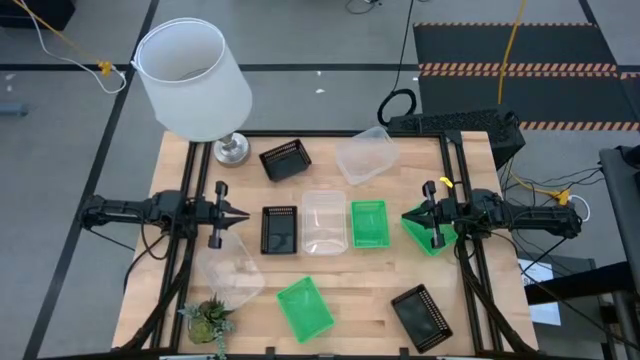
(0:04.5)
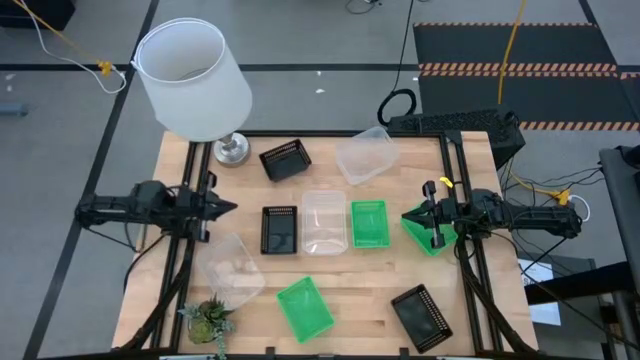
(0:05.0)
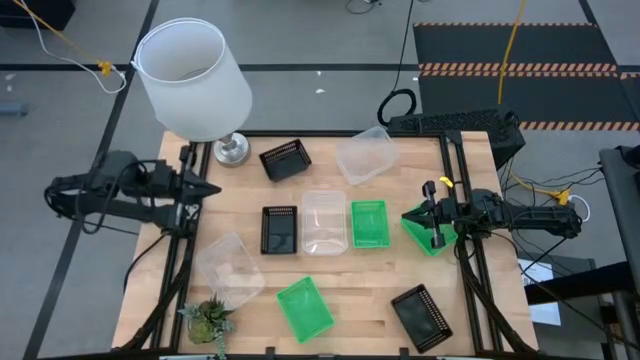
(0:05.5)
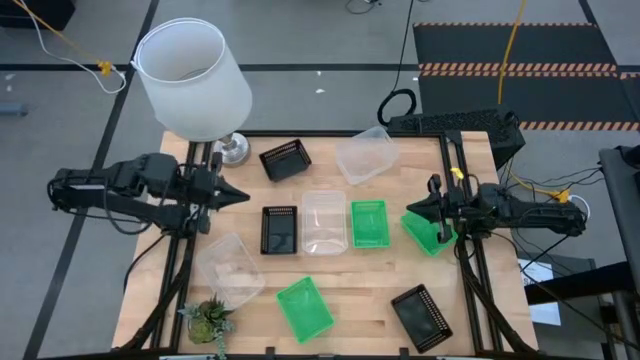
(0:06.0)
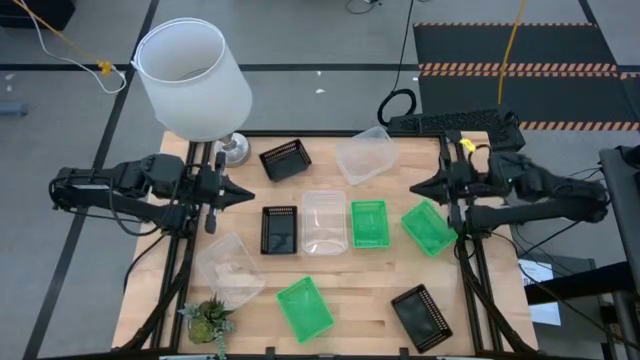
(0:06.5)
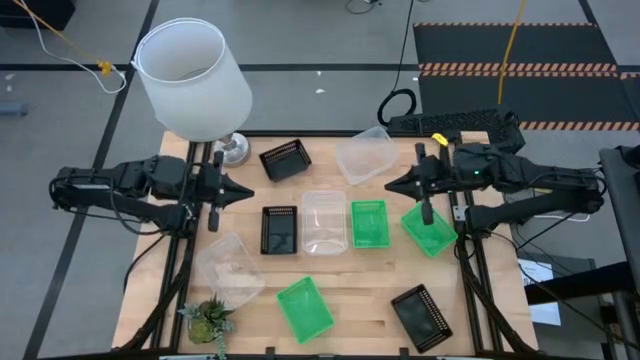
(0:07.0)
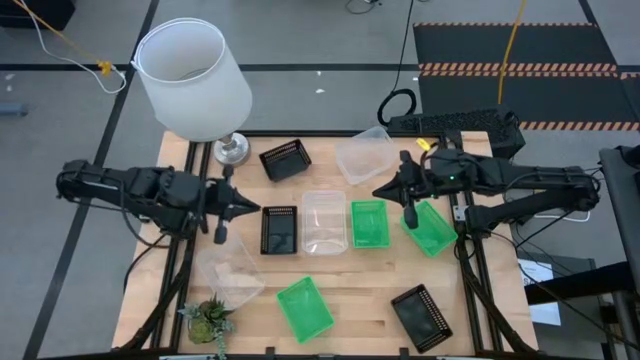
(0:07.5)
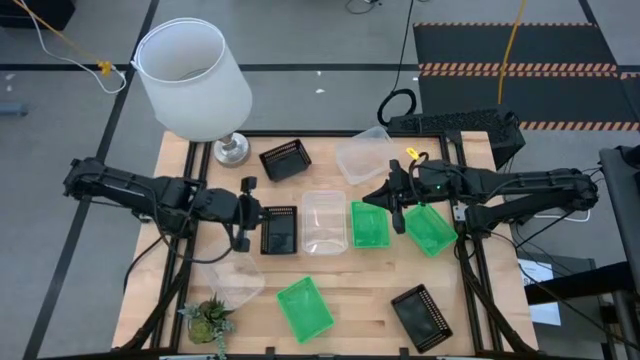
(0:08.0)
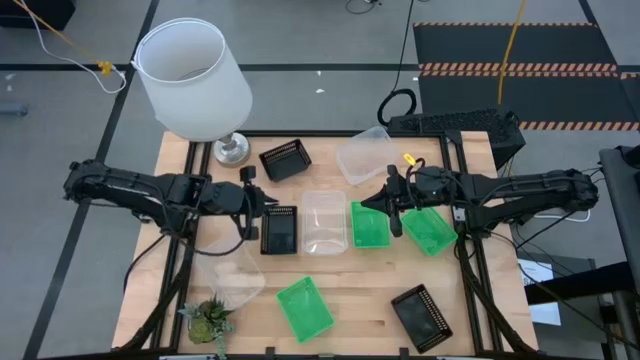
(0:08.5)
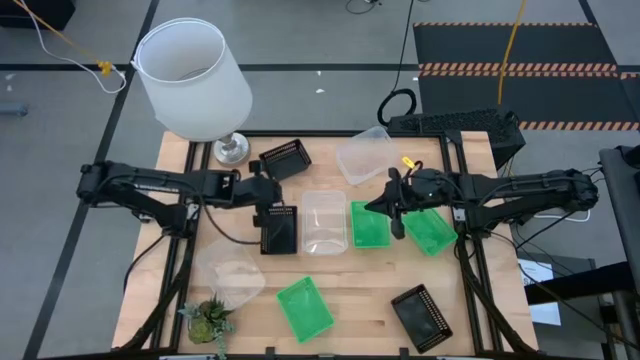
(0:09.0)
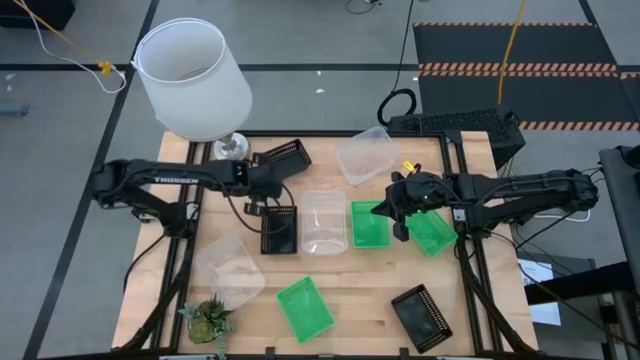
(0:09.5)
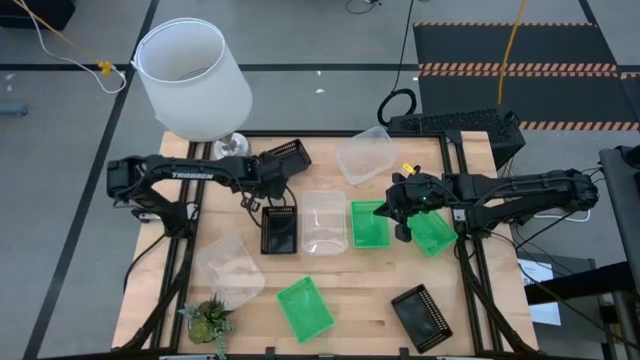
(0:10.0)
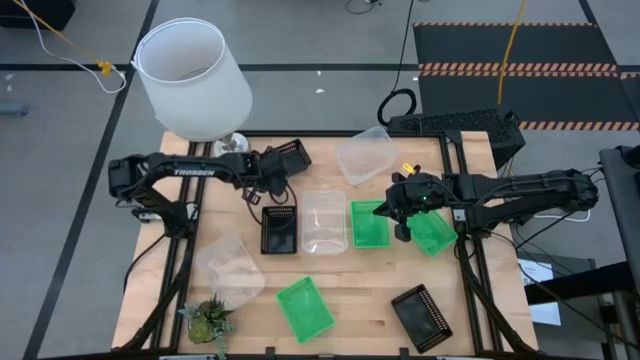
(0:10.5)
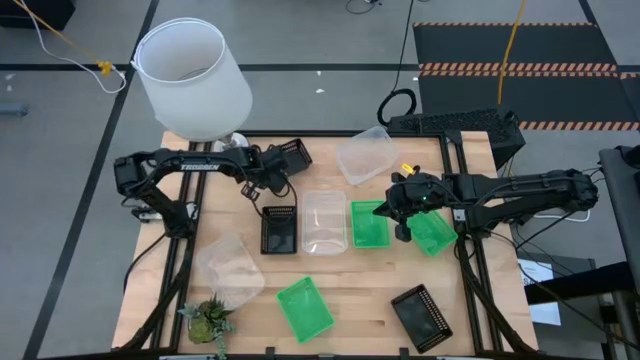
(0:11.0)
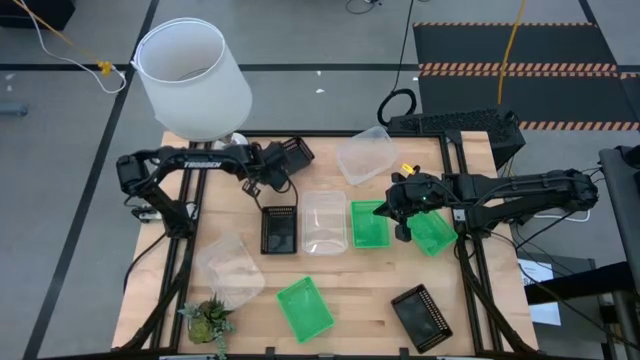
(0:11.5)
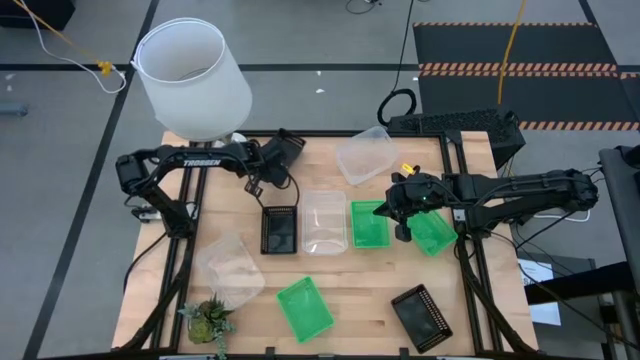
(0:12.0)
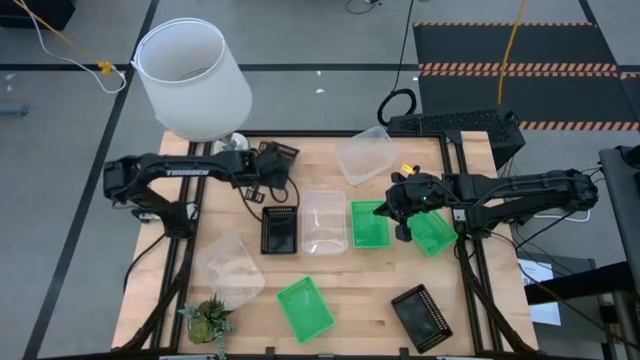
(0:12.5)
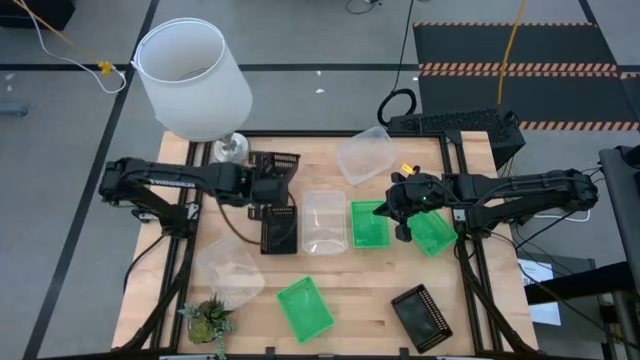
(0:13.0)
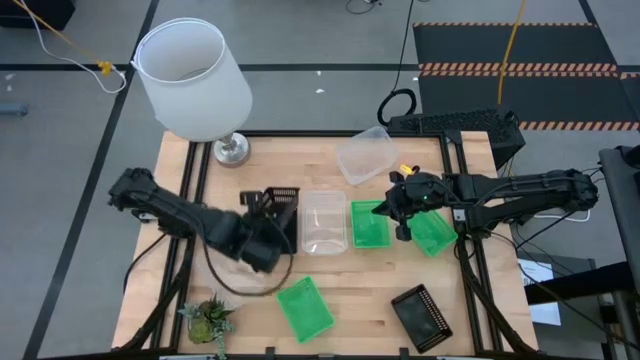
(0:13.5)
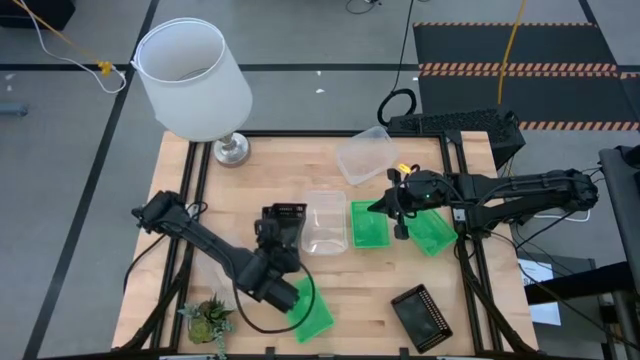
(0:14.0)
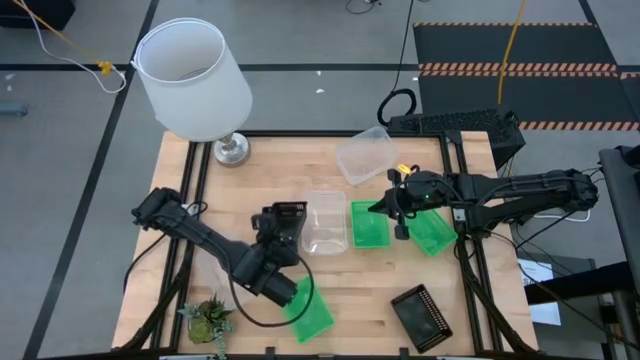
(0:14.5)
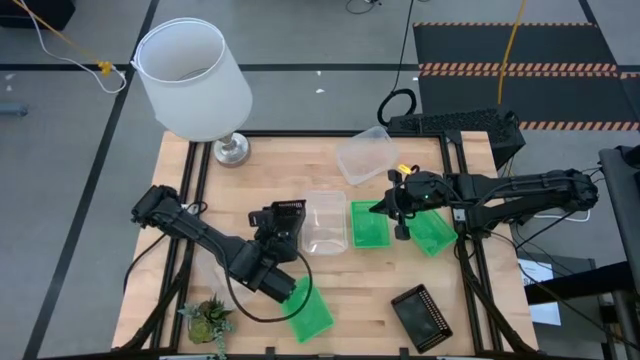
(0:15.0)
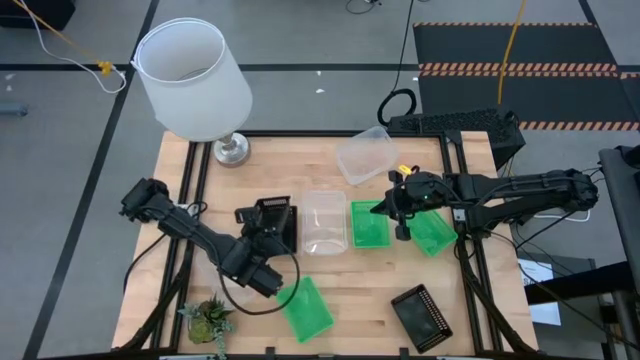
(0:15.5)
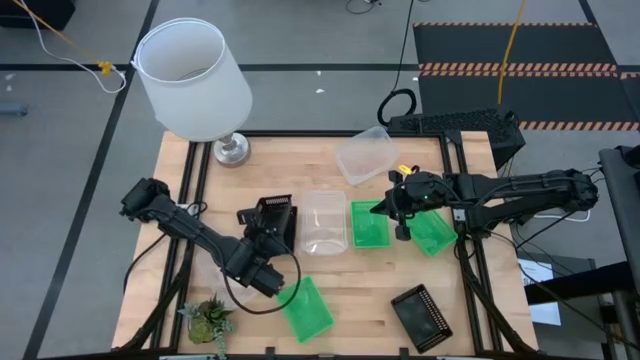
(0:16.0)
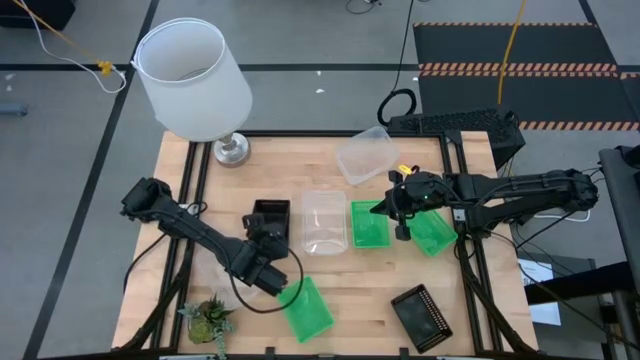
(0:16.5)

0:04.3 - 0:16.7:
Stack the top left black bin on the middle left black bin

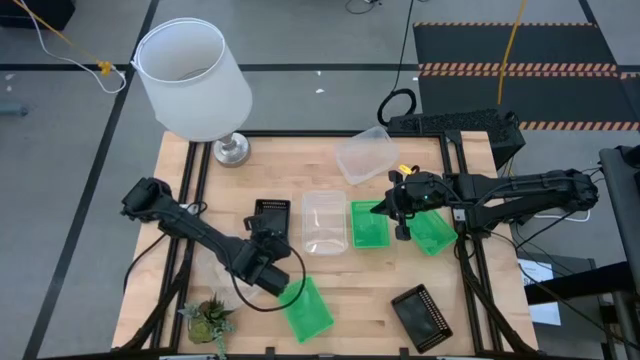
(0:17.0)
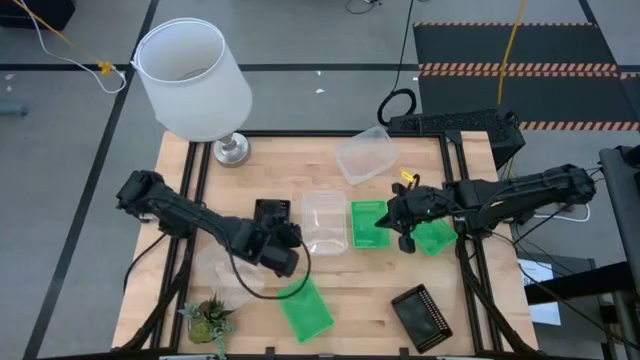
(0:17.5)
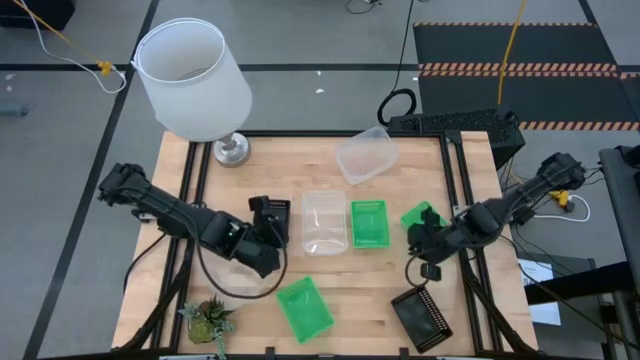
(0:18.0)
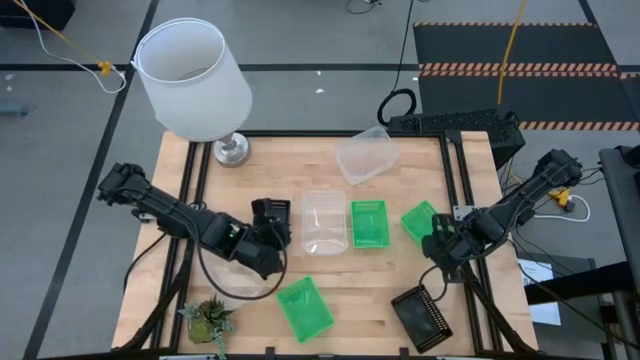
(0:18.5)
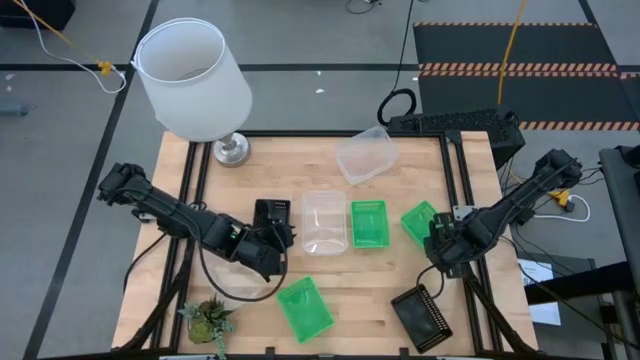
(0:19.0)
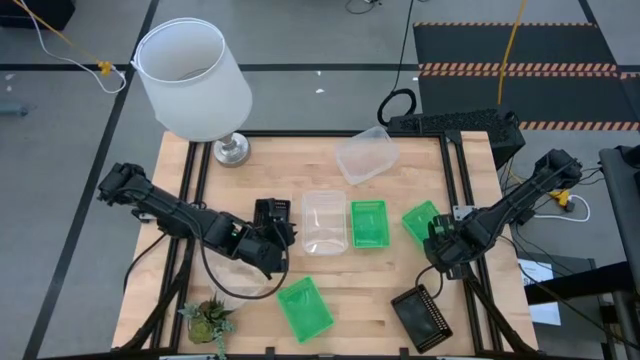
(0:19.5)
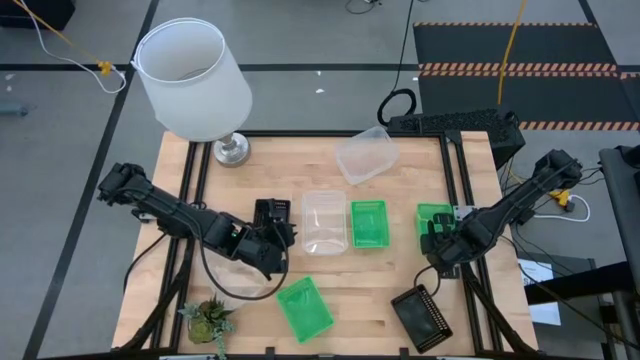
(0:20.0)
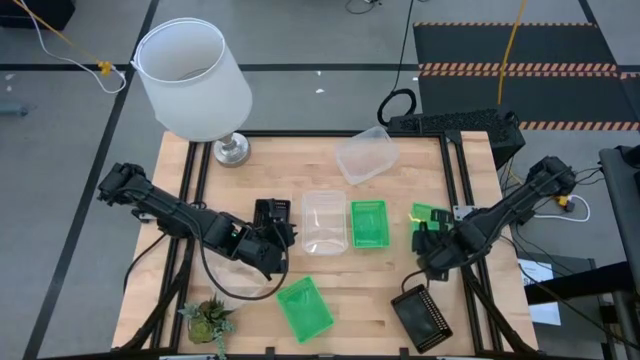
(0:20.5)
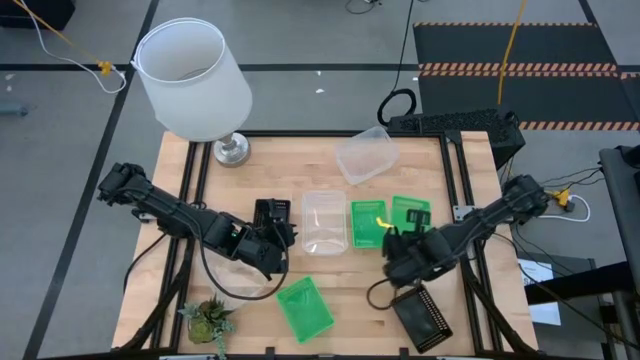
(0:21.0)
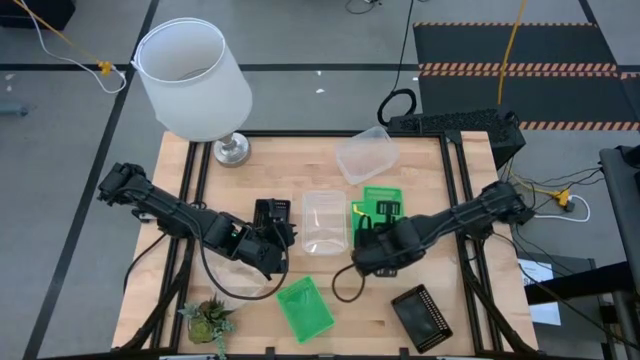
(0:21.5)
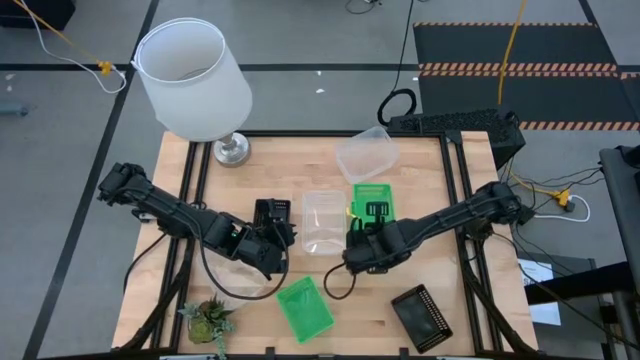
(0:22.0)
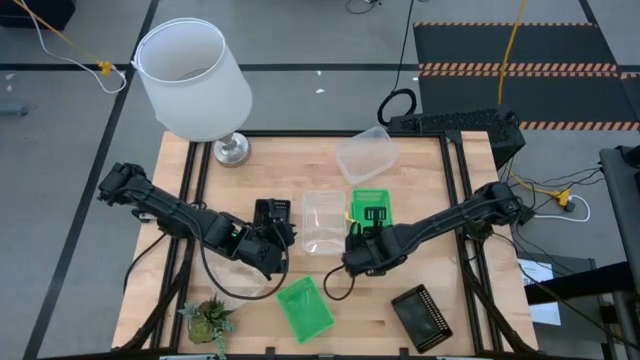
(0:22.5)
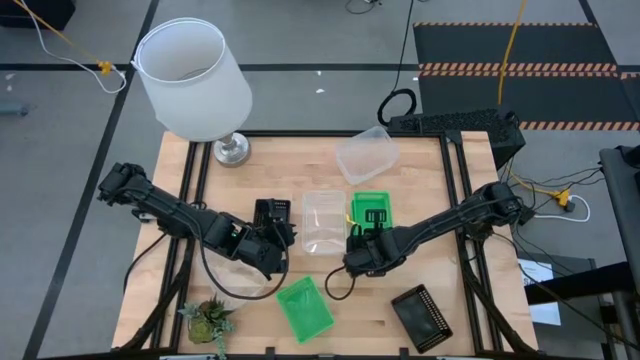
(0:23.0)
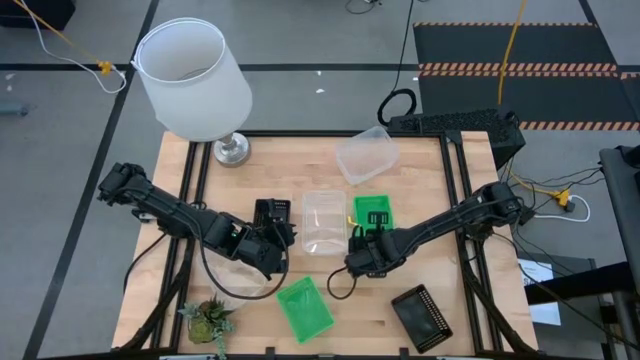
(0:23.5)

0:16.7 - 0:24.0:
Stack the top right green bin on the top middle green bin
